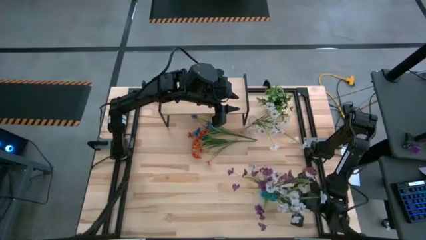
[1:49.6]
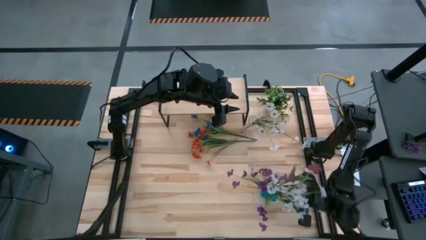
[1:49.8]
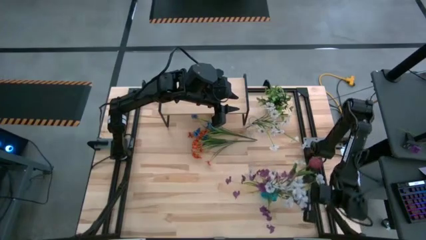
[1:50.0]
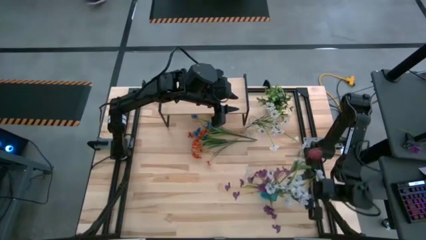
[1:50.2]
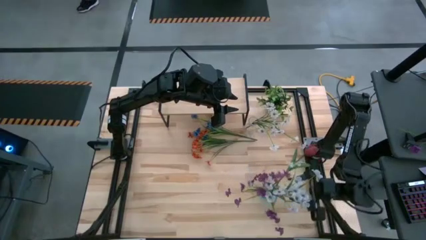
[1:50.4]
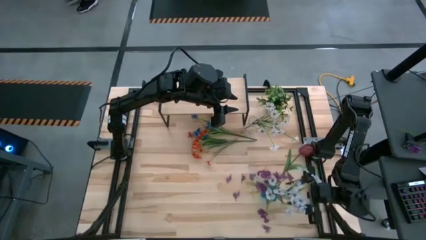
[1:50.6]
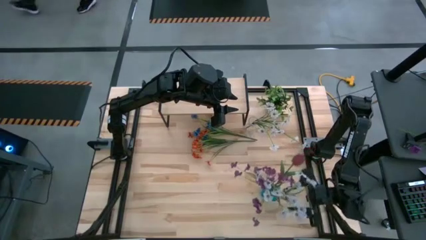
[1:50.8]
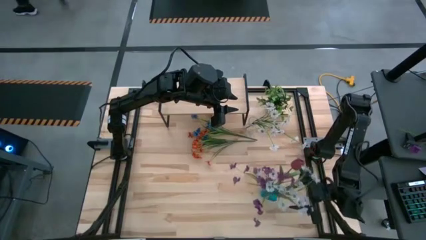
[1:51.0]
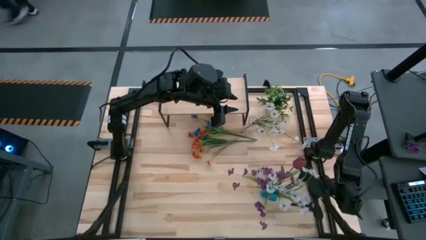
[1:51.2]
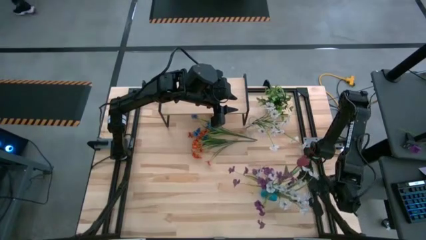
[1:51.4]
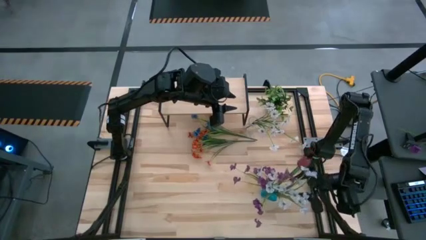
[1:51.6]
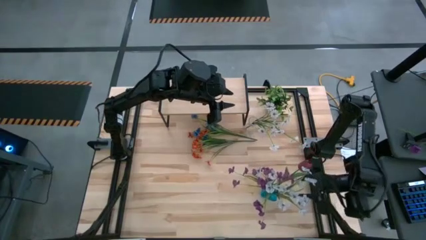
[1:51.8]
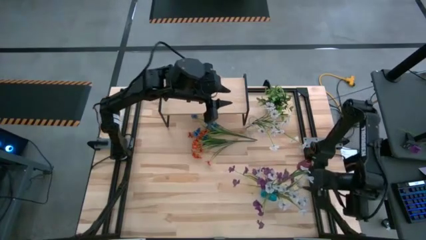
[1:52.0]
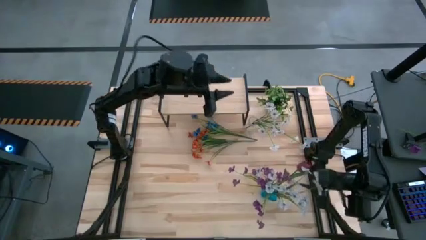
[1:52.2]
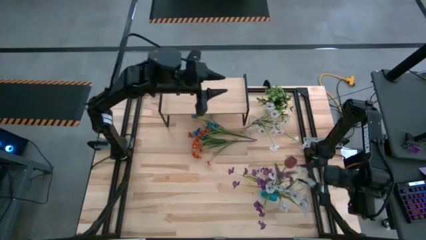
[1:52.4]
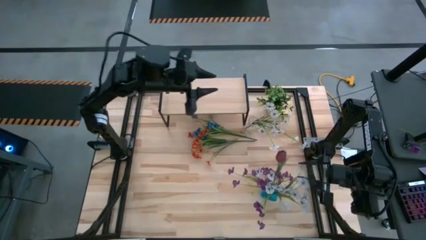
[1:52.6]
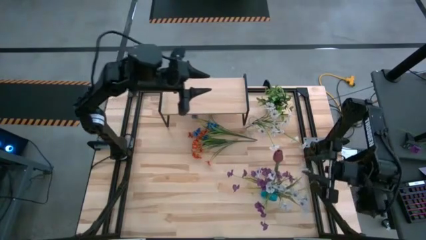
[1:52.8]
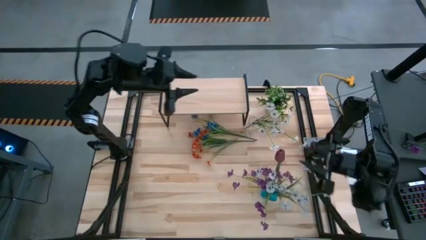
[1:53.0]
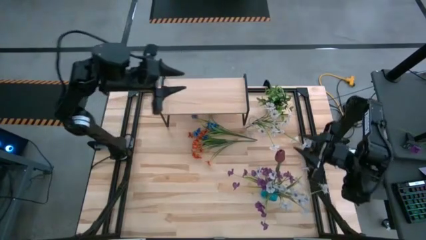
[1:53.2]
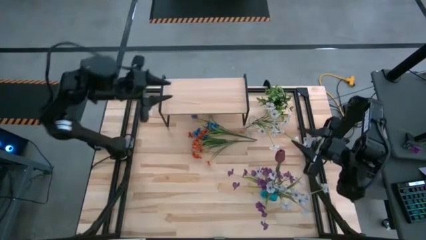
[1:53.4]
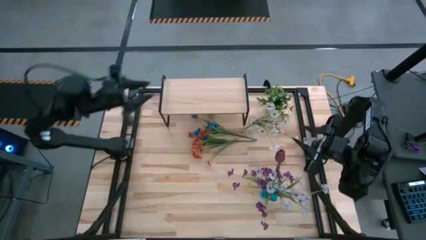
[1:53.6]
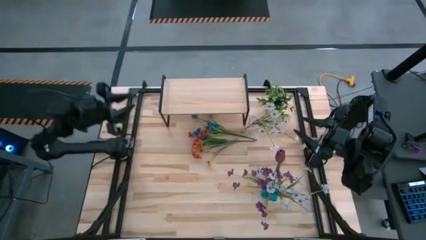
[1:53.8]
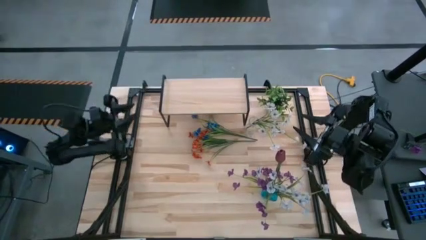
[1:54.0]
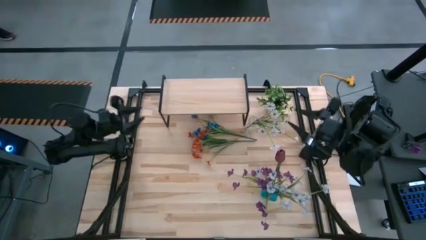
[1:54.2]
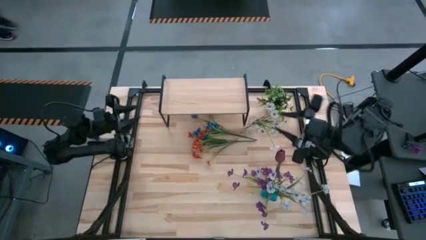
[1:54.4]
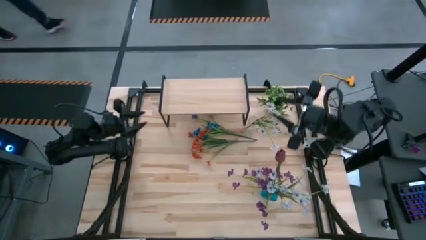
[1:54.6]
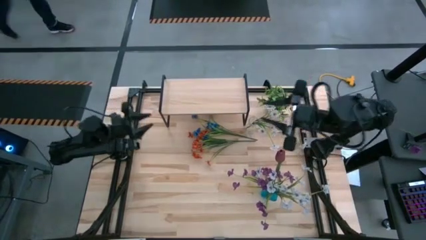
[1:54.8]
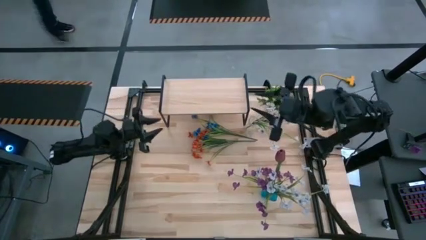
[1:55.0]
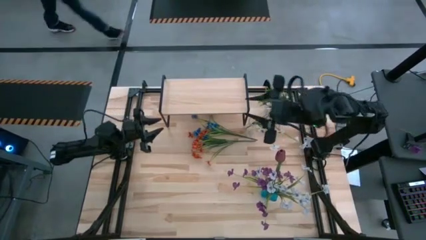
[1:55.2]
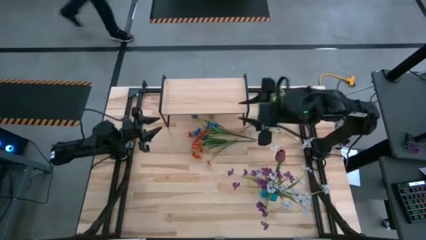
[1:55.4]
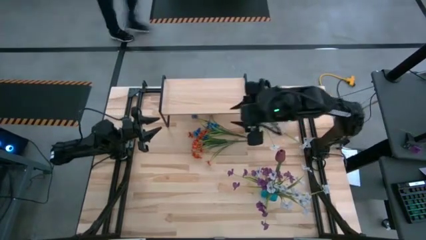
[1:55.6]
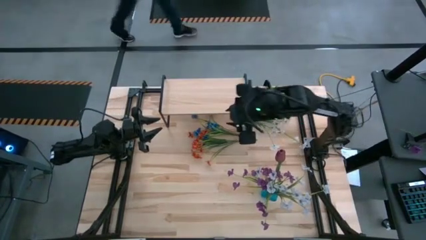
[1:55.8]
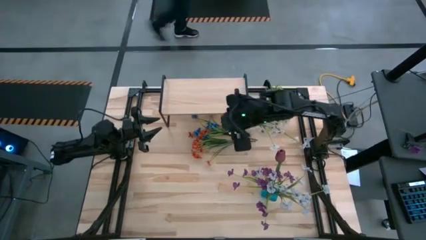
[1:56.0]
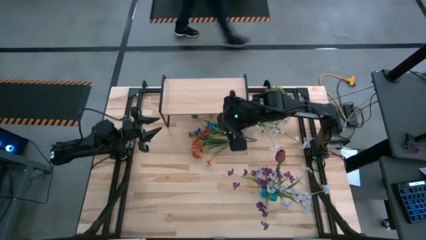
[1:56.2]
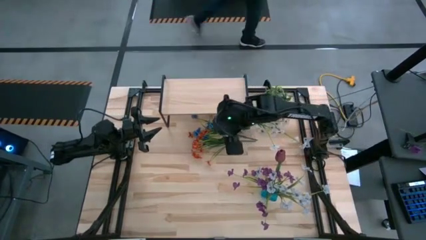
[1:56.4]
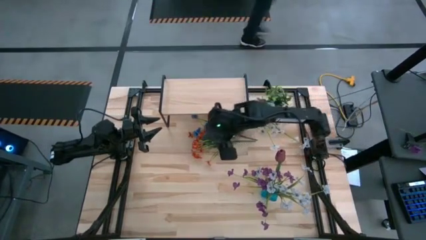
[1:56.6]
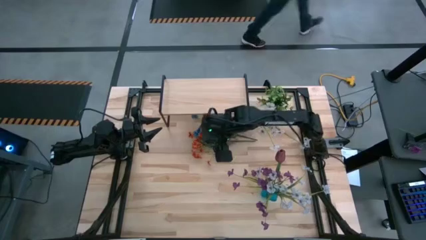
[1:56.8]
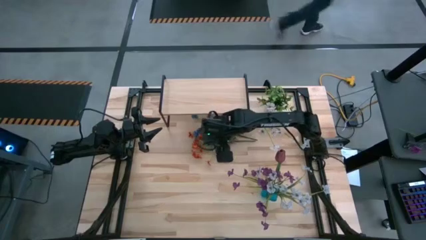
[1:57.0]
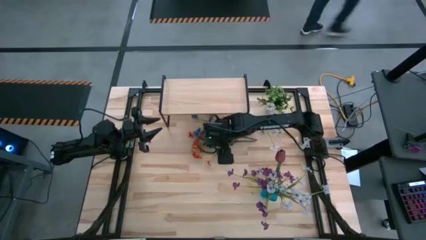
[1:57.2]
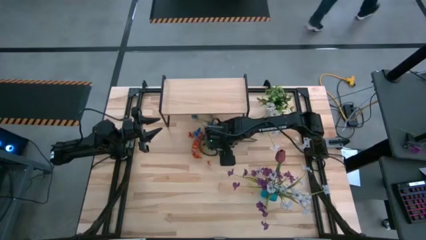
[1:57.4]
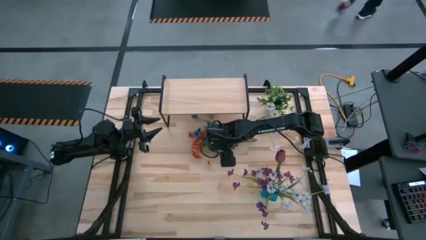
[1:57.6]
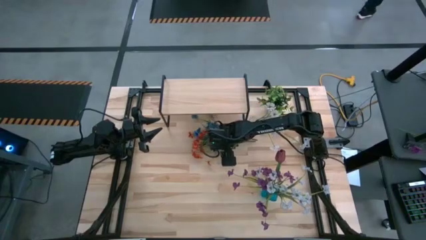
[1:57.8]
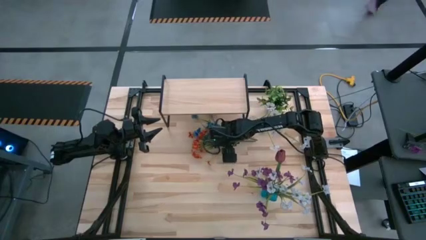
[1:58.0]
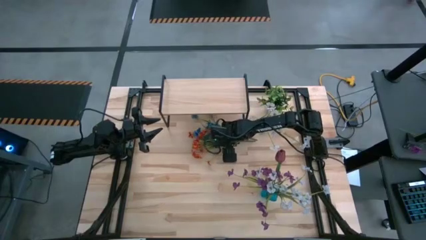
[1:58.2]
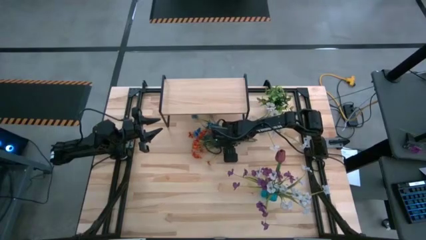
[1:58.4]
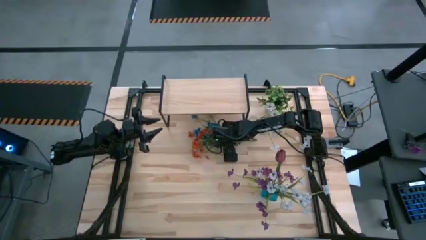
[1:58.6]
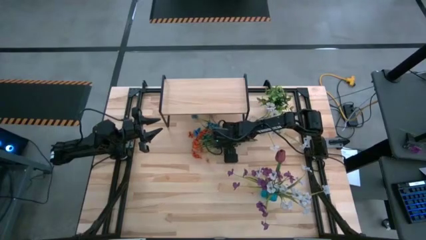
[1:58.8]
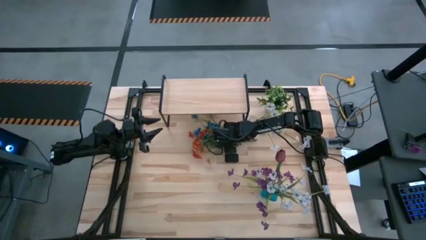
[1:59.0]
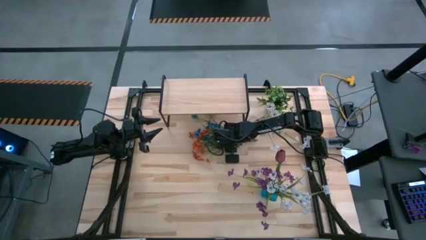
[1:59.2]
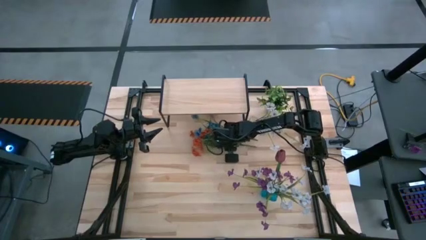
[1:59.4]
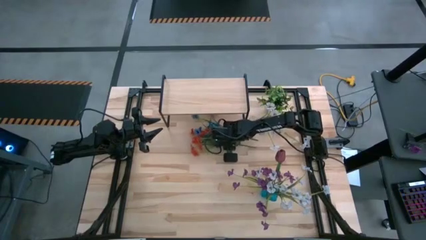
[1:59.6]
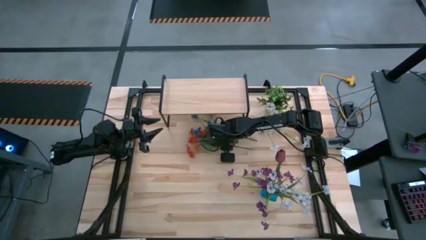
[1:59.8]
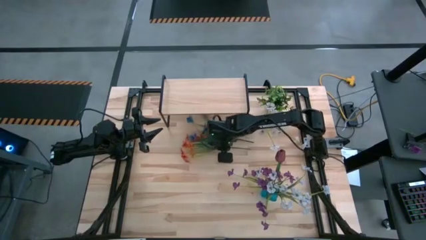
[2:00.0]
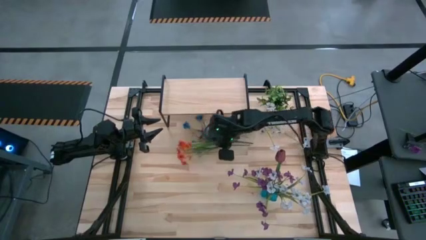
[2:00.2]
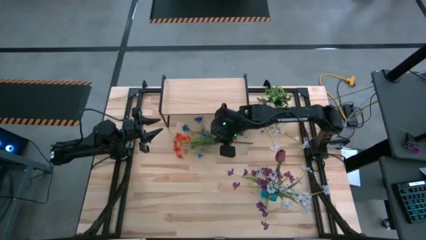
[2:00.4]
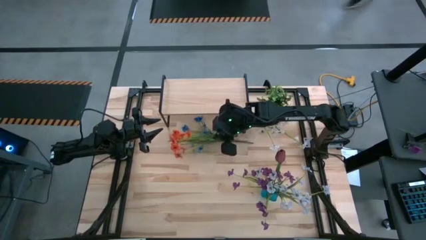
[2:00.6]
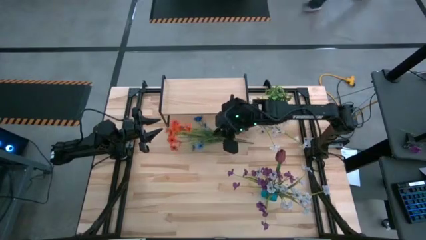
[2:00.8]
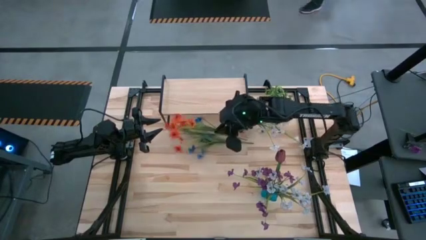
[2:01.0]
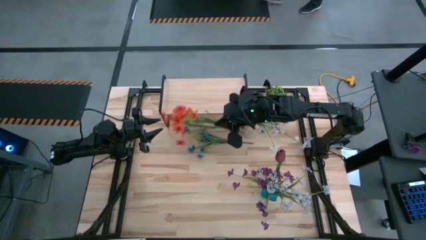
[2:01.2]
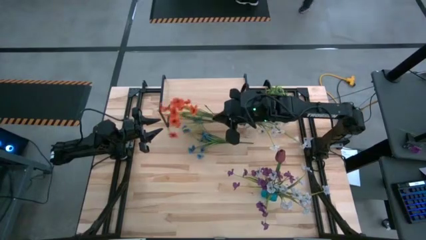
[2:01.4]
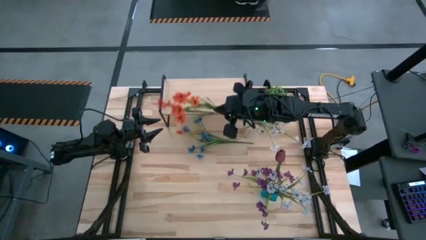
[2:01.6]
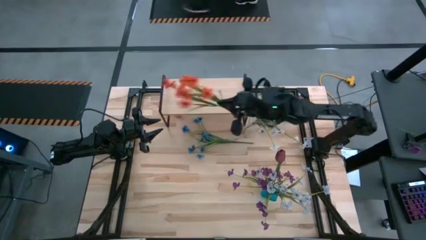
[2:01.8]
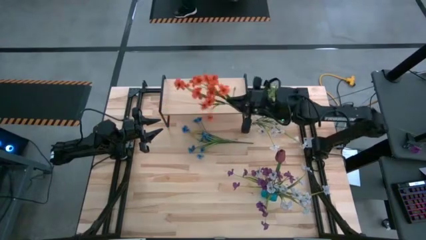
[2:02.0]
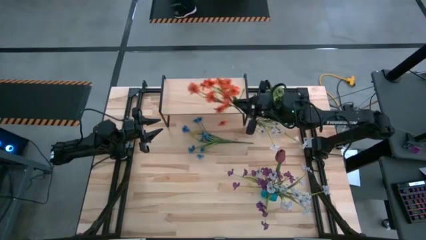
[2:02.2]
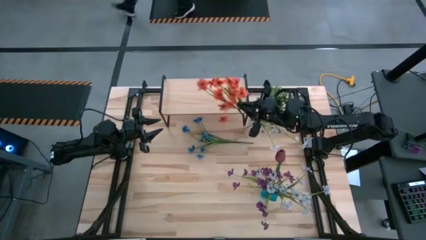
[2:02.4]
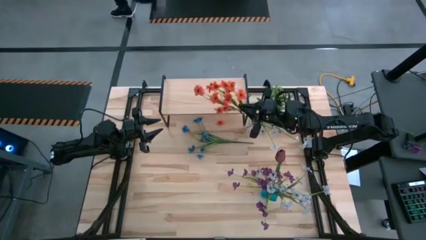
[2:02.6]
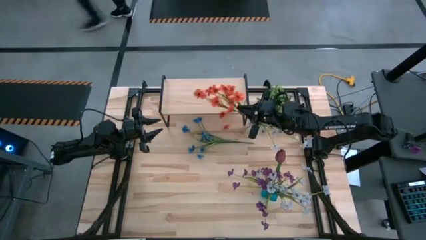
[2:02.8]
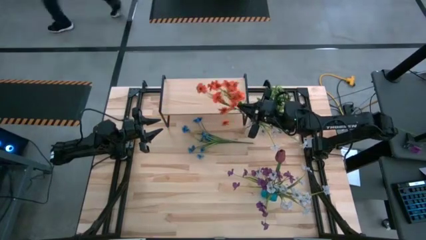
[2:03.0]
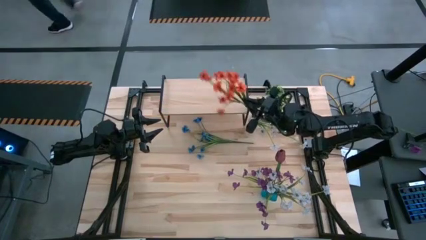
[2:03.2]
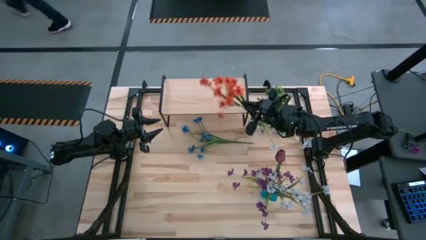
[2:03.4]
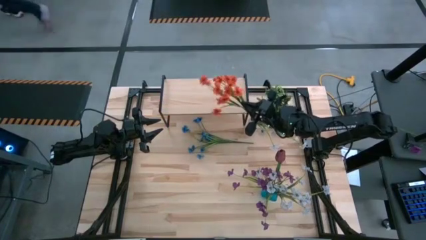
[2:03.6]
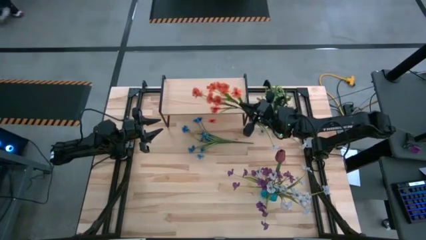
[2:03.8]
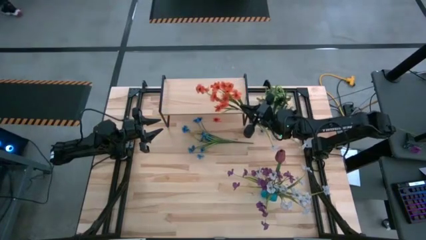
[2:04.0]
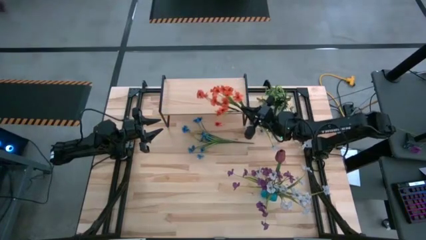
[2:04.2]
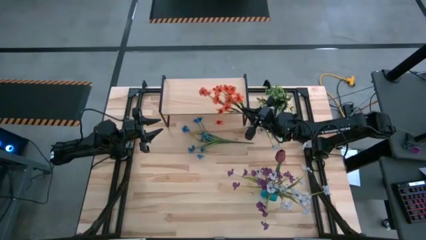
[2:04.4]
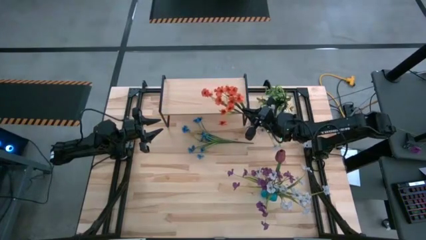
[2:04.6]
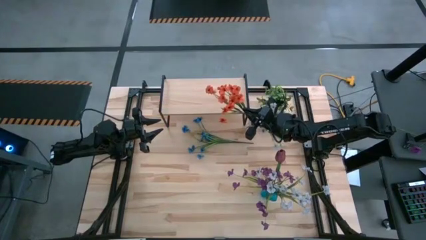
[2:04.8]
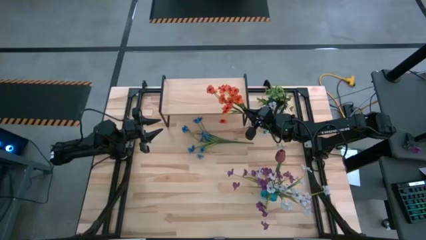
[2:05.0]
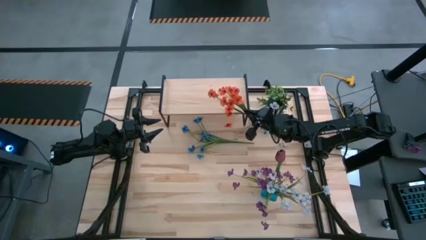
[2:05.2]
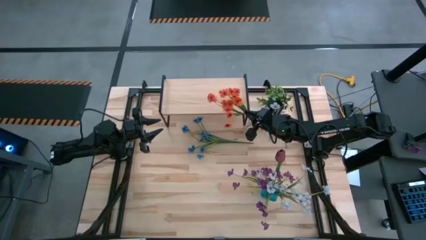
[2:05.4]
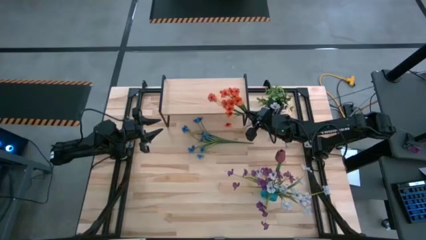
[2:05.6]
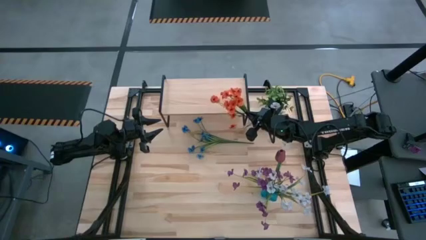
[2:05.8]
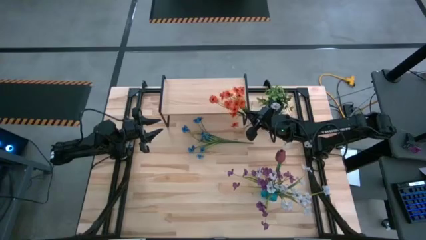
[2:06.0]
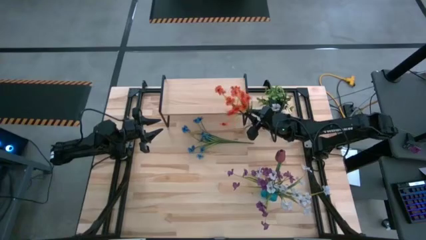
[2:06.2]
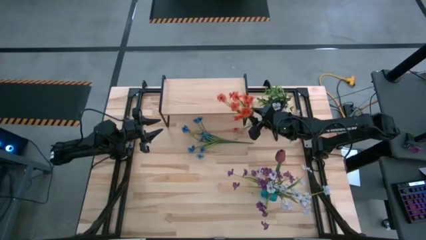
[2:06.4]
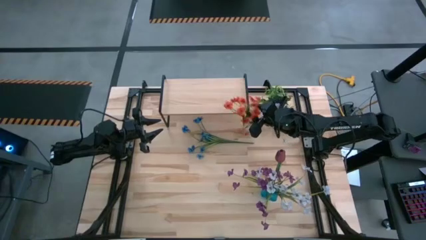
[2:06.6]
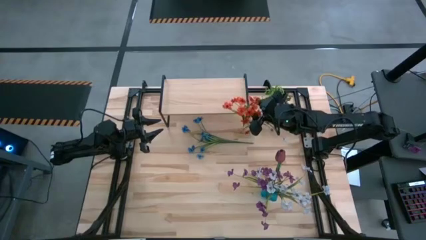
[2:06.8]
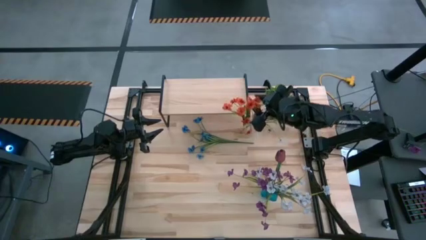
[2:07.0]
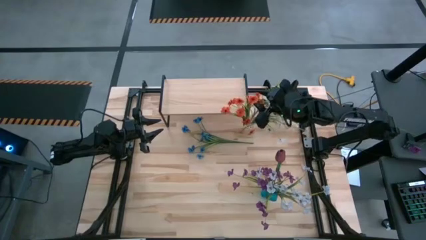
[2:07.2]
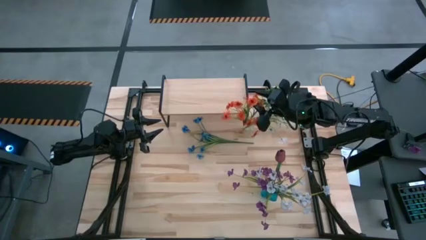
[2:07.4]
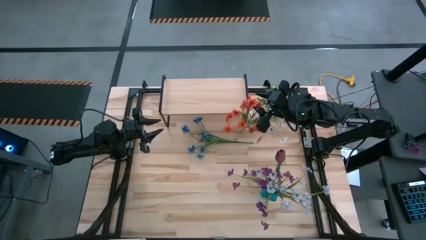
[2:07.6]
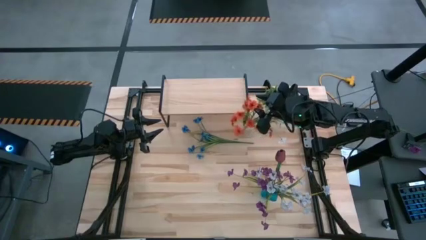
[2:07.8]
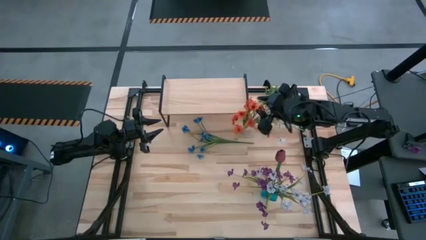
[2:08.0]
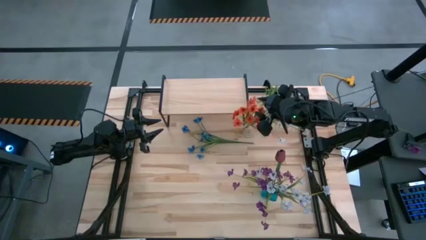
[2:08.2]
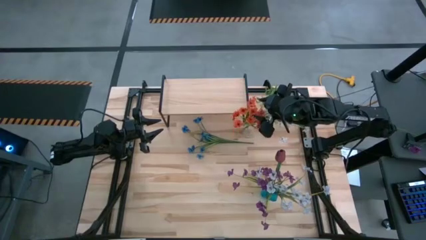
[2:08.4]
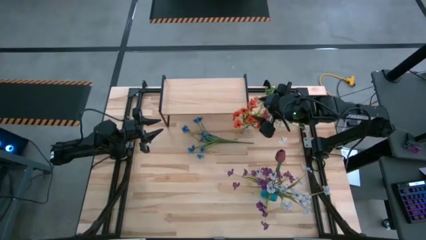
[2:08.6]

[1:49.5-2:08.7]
Task: Pick and place flowers into a vace then onto a shelf
Put the orange flowers into the transparent flower vase
